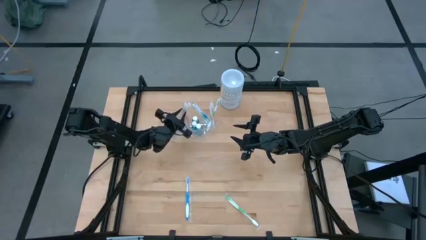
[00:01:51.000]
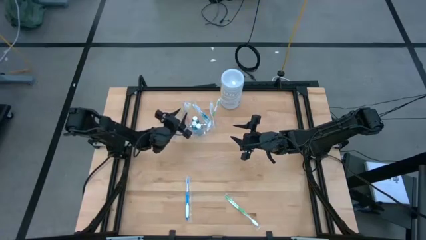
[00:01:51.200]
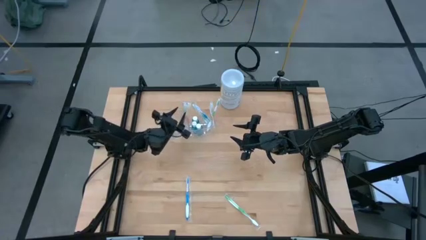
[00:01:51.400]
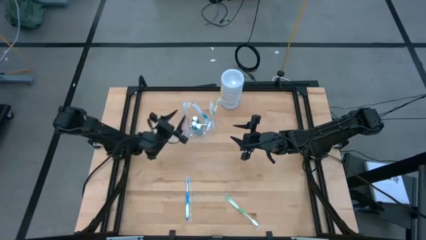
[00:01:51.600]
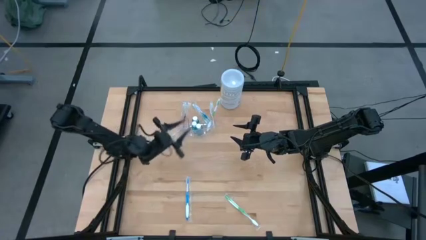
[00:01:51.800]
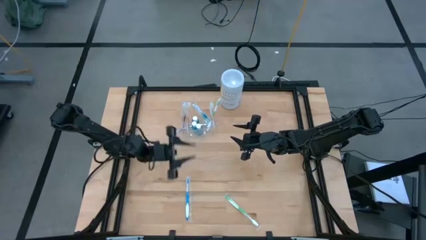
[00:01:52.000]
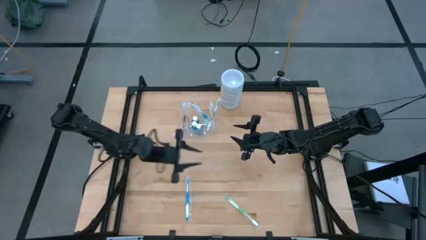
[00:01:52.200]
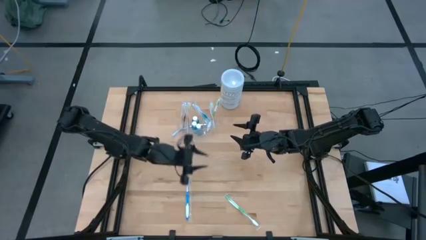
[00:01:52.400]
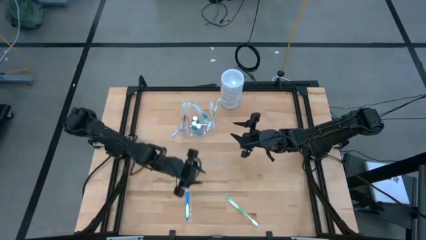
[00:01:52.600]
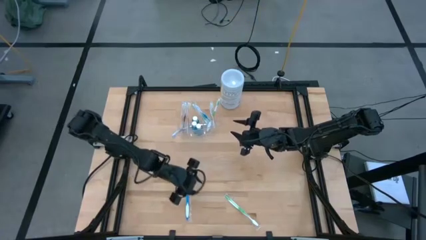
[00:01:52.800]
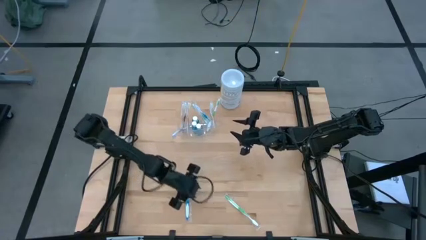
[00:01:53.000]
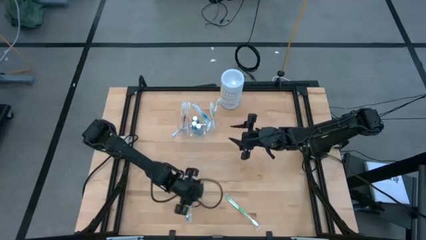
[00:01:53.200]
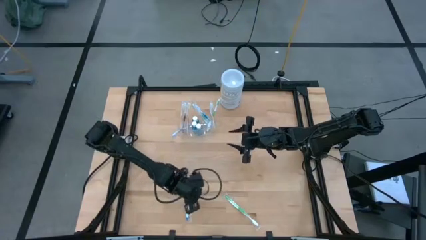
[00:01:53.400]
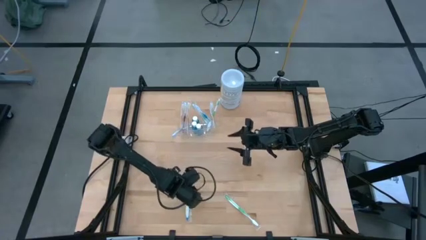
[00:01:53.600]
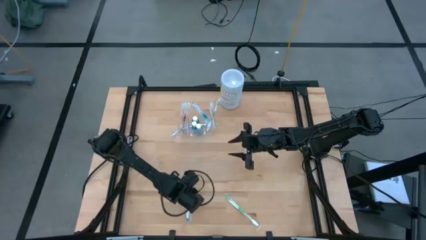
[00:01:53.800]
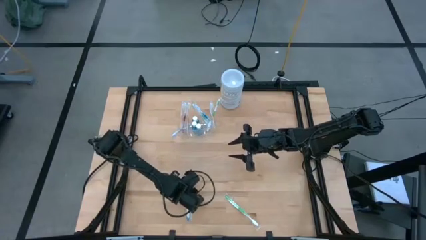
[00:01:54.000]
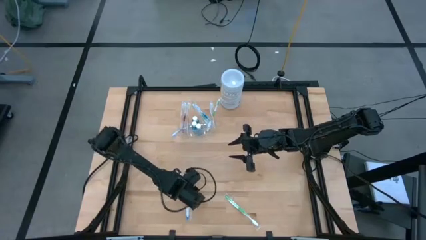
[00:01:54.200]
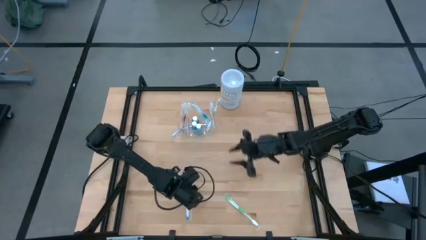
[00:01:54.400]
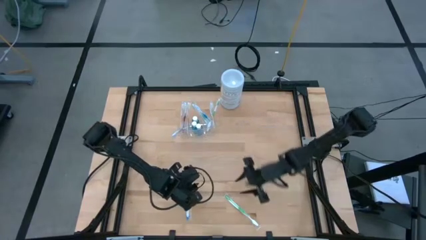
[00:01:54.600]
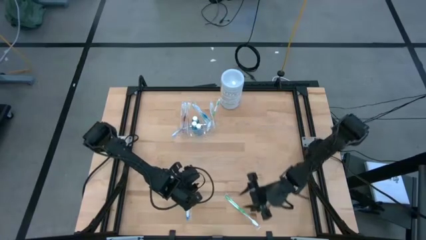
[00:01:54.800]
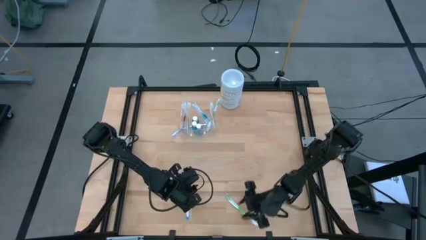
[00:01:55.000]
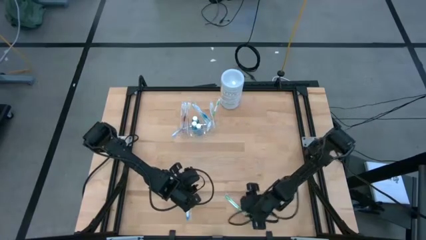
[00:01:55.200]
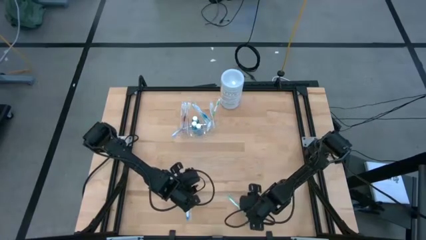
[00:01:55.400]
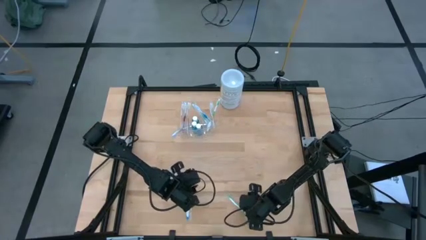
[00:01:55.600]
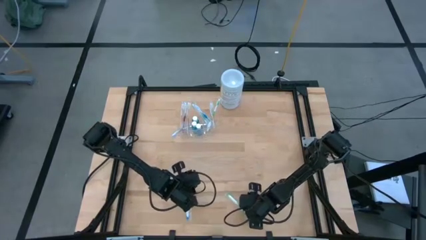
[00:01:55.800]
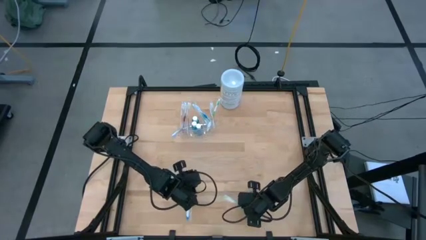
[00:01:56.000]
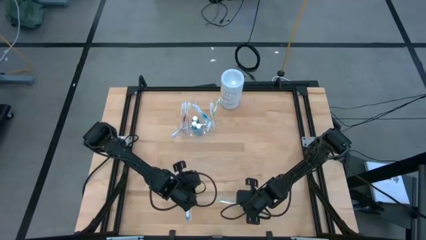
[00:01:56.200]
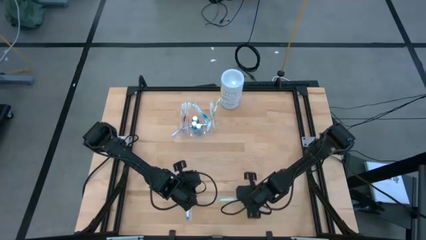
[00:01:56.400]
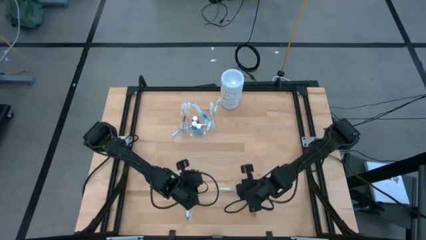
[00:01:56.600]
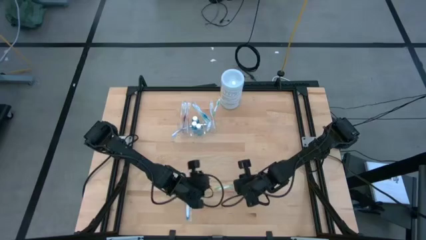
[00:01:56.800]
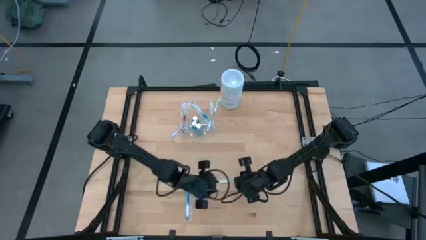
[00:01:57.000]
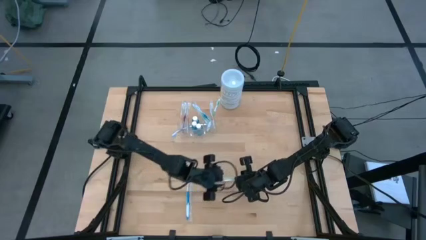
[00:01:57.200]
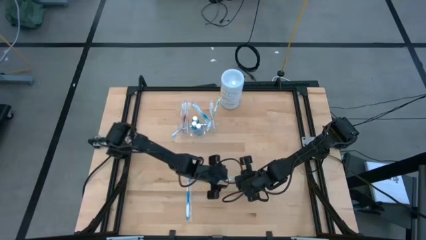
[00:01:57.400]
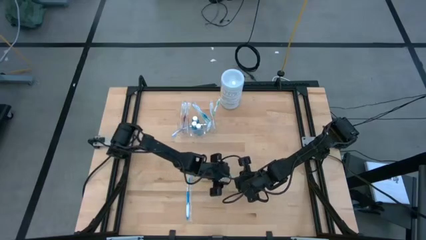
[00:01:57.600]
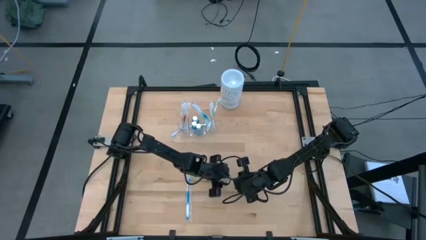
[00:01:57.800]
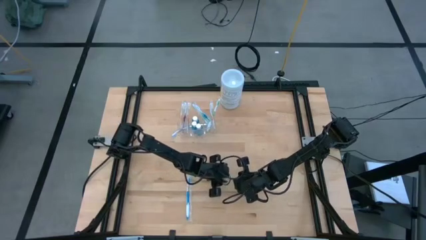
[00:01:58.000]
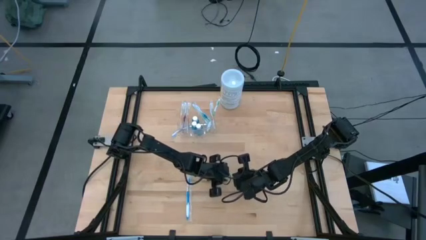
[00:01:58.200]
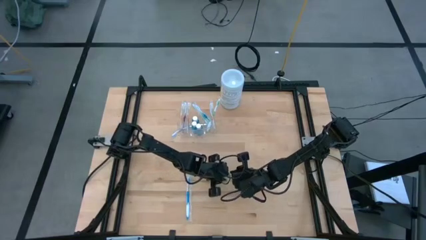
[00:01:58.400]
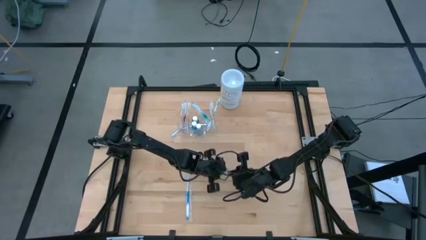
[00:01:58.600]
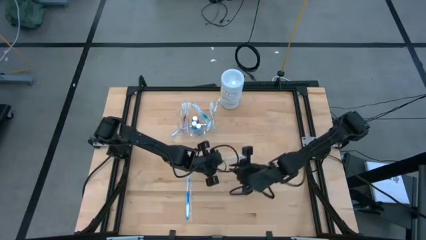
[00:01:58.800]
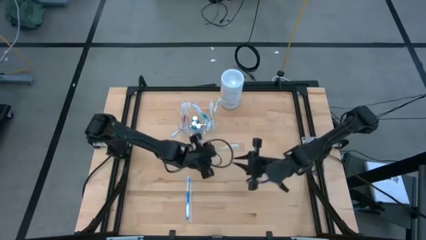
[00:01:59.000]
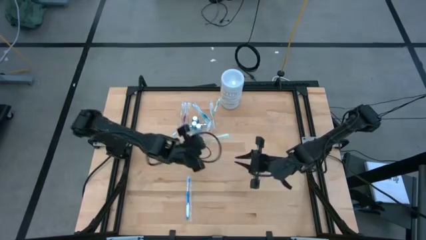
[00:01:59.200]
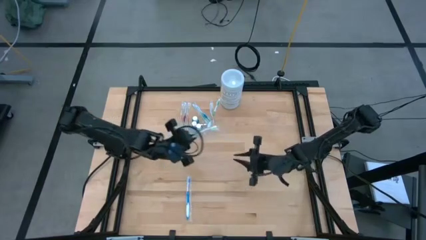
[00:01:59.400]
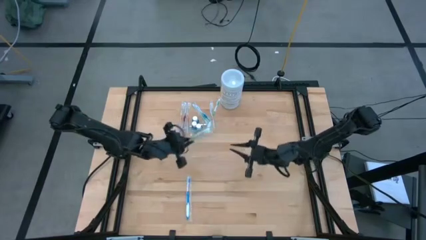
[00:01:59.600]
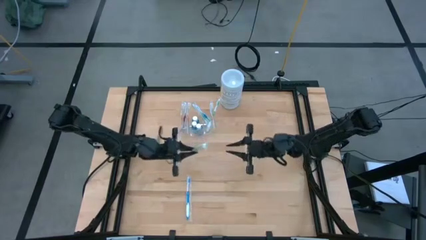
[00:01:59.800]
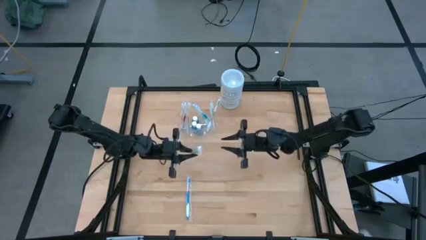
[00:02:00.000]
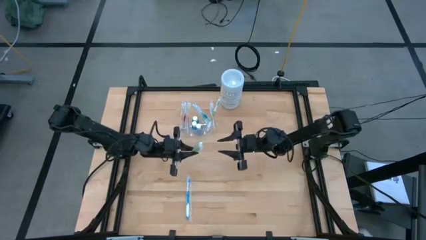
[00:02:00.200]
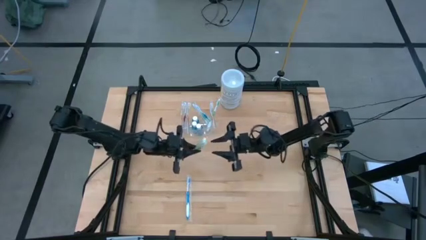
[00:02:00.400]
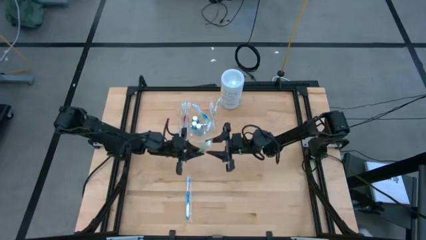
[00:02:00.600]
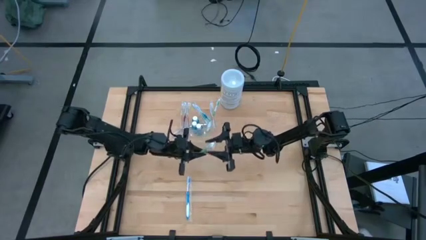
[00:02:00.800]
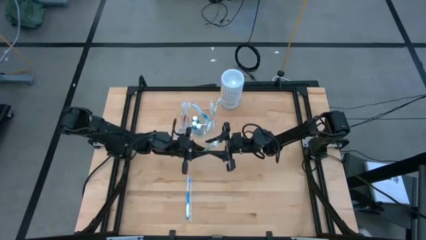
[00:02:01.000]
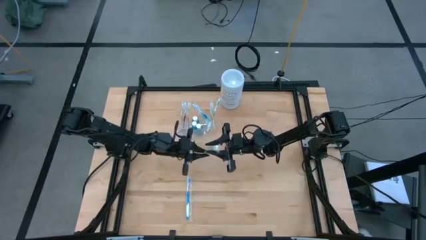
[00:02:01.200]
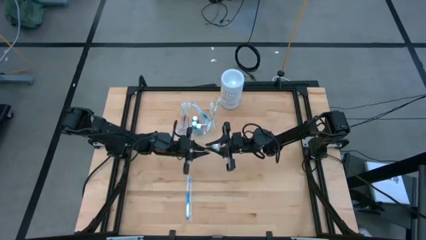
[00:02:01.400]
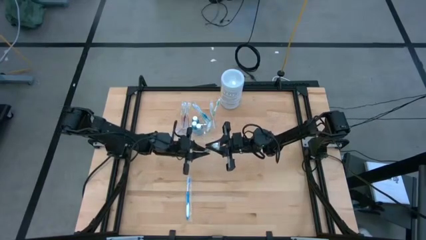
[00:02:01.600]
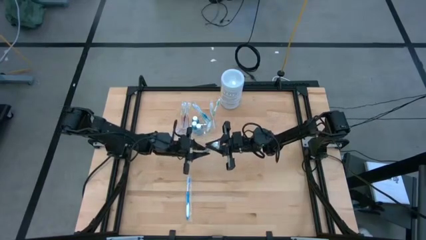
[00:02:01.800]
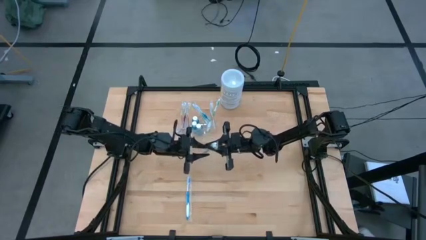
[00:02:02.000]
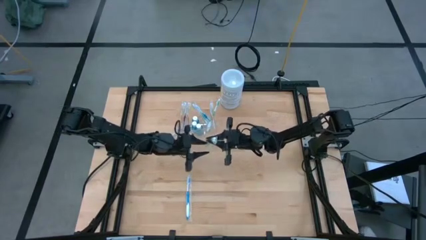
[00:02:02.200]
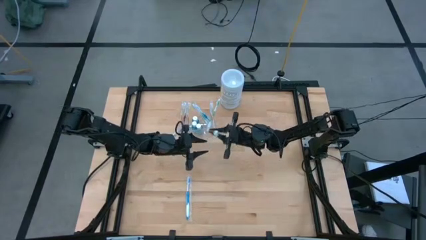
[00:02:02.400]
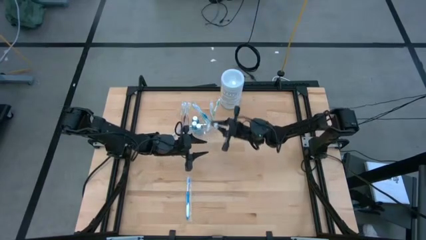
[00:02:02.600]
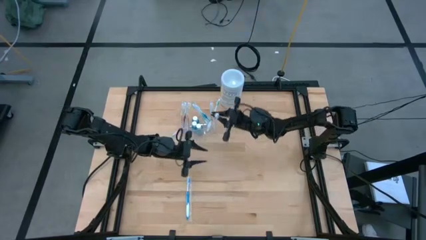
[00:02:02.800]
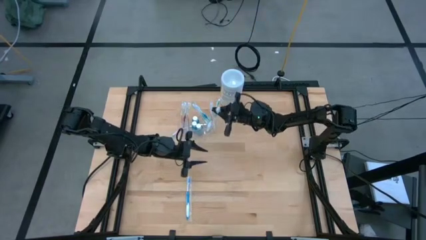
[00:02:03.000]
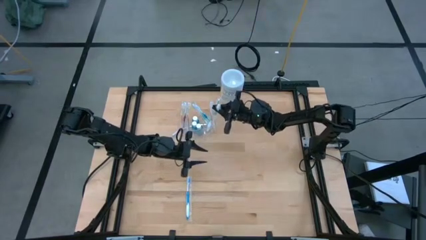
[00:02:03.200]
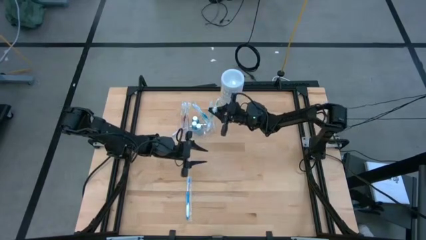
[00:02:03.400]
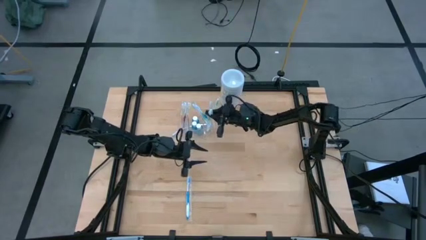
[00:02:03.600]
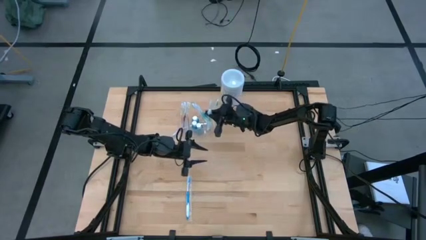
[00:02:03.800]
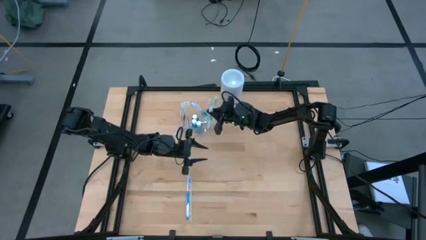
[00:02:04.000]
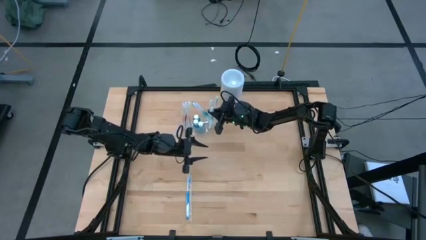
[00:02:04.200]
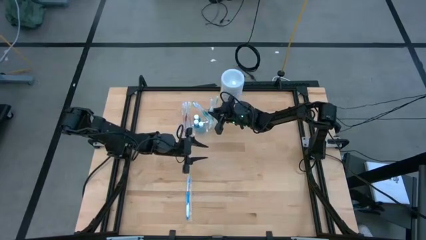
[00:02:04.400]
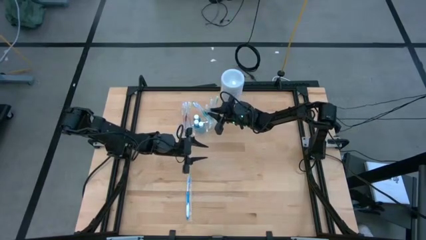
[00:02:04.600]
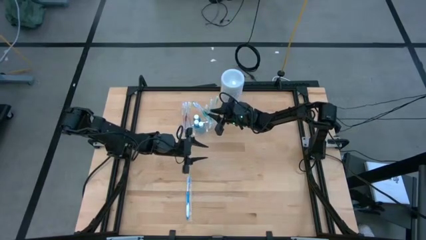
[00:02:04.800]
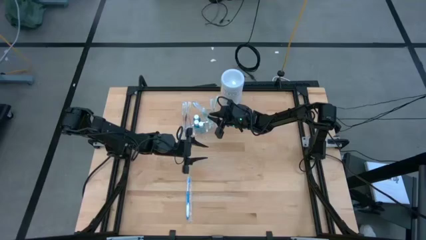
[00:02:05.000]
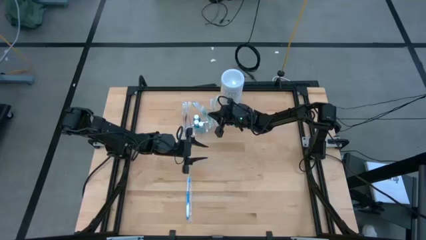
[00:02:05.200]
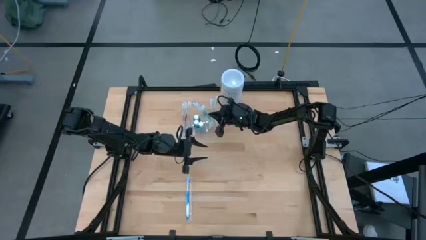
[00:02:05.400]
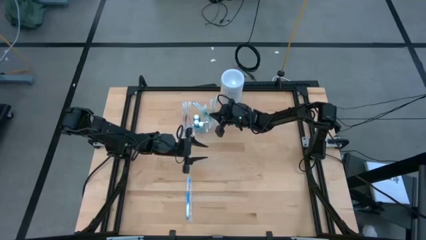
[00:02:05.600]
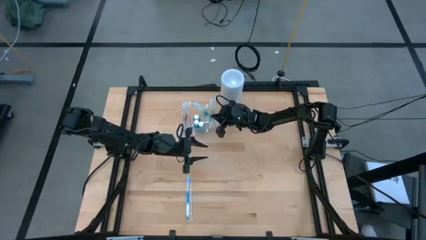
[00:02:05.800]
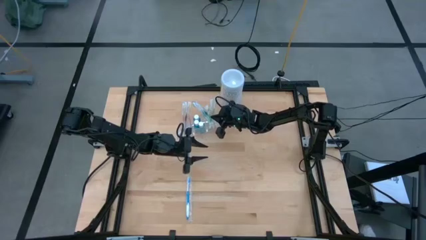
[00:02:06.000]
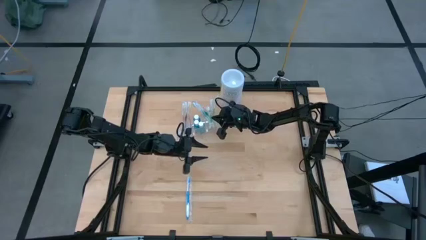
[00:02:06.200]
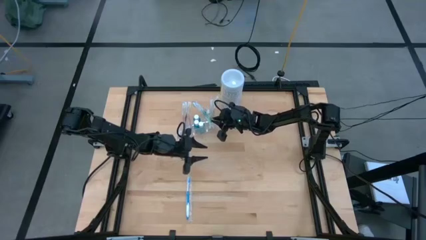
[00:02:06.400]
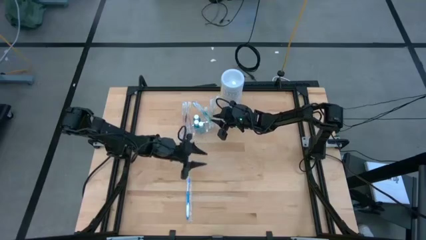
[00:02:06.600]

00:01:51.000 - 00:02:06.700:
Task: Pick & Place toothbrushing station
Put the green toothbrush into the transparent organizer

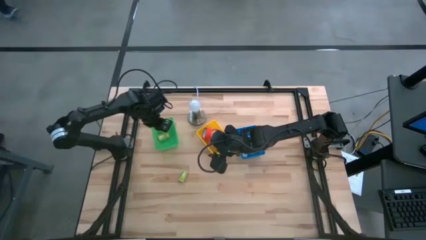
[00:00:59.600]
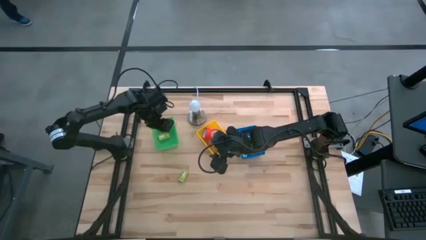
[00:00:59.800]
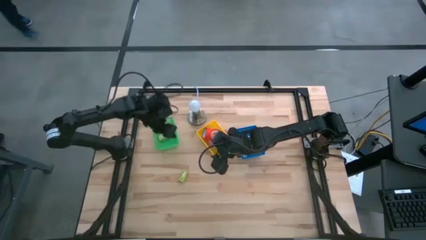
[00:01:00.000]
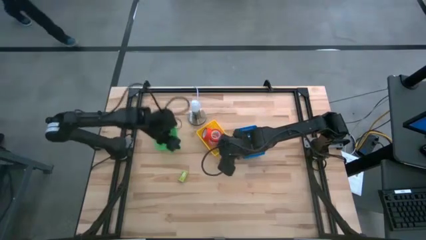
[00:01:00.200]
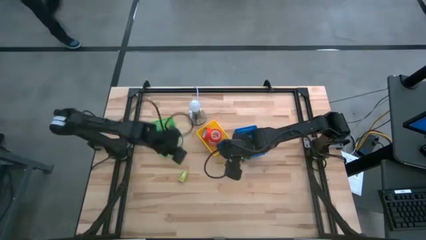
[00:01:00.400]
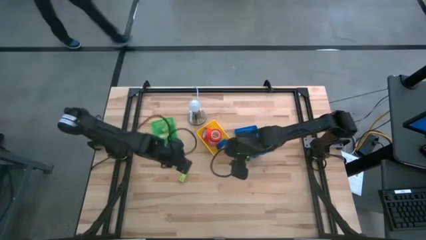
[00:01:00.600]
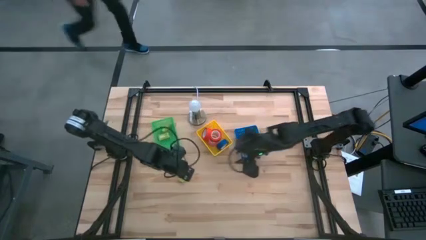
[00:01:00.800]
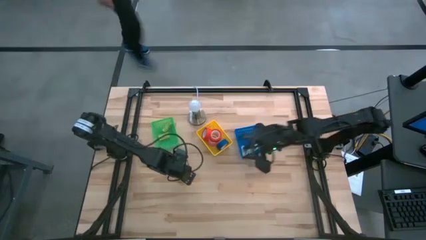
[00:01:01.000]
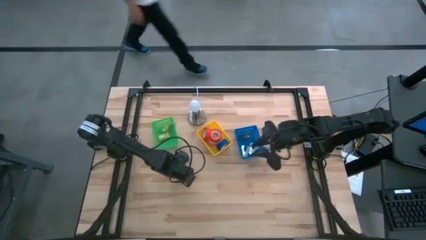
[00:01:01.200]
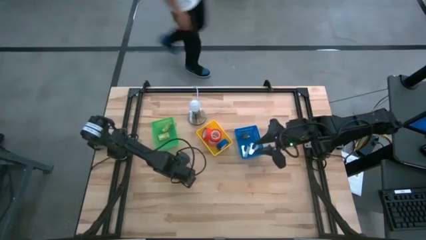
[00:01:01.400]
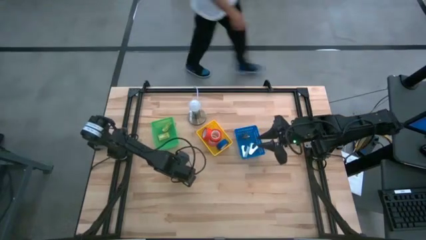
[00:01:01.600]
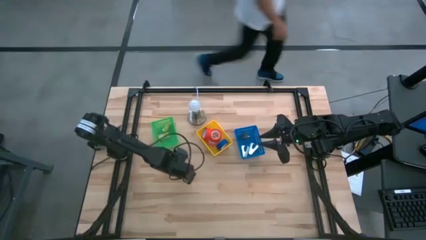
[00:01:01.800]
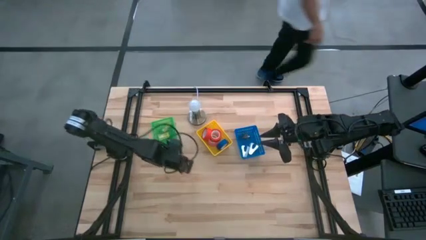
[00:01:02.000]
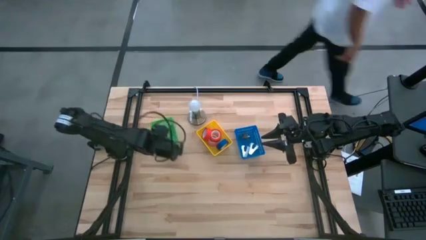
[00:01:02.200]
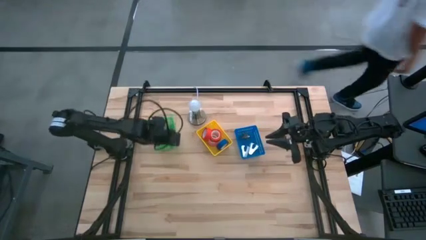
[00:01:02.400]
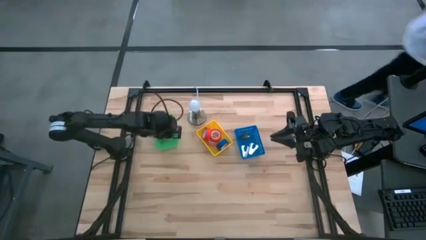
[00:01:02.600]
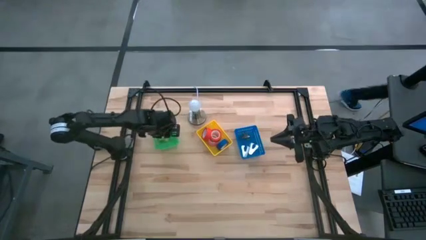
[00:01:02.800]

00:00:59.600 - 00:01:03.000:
Task: Pick and place Stapler, Stapler remover, tape
Put the staple box into the green basket
